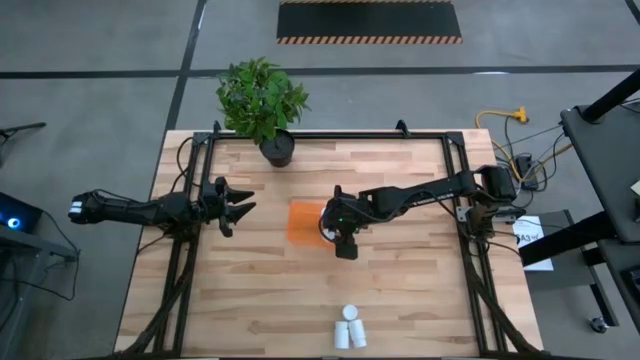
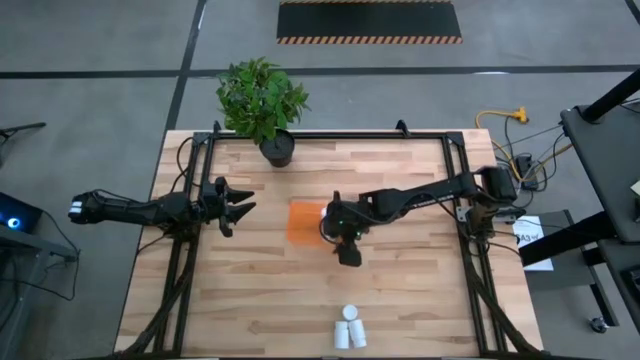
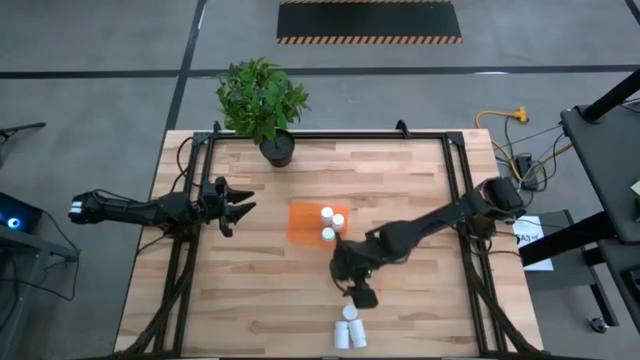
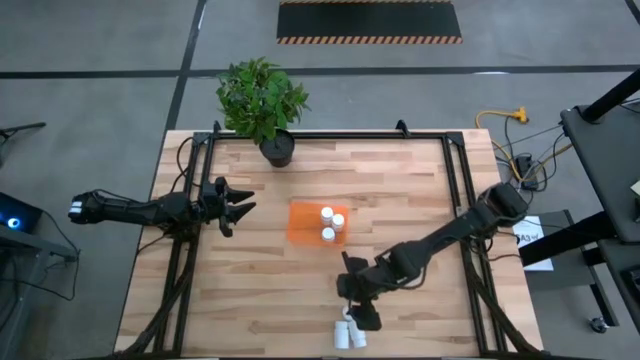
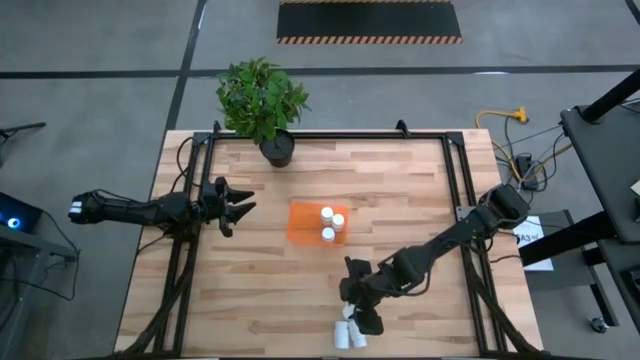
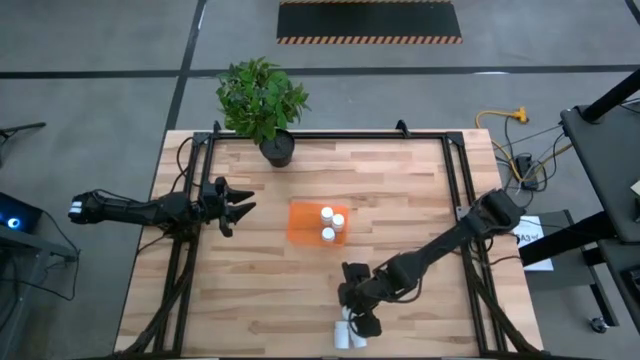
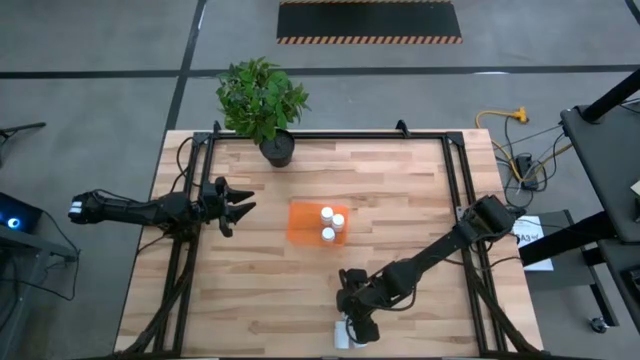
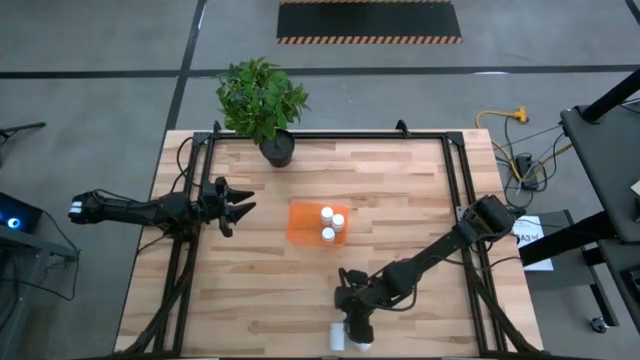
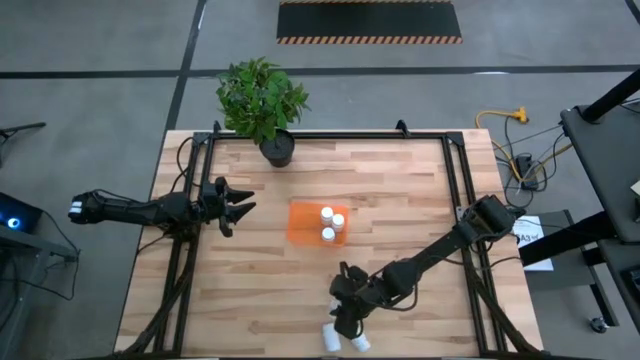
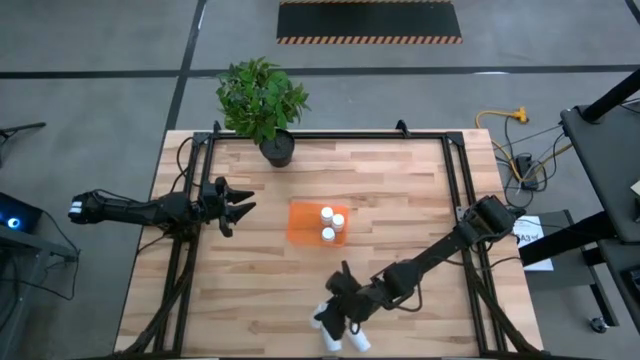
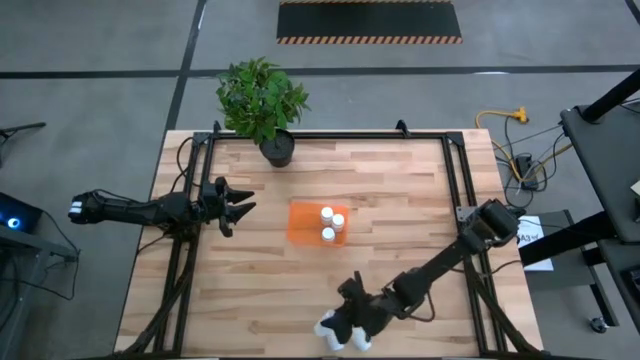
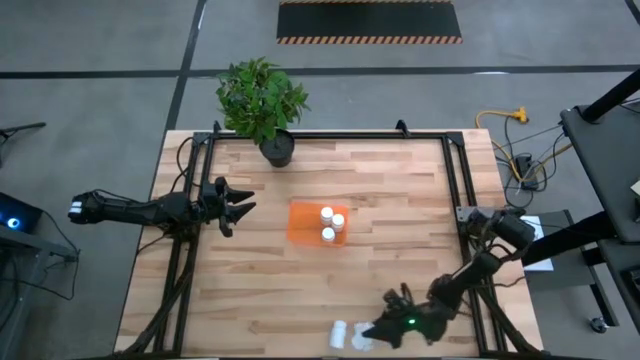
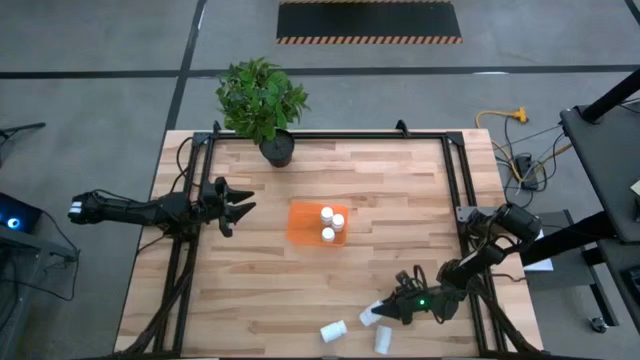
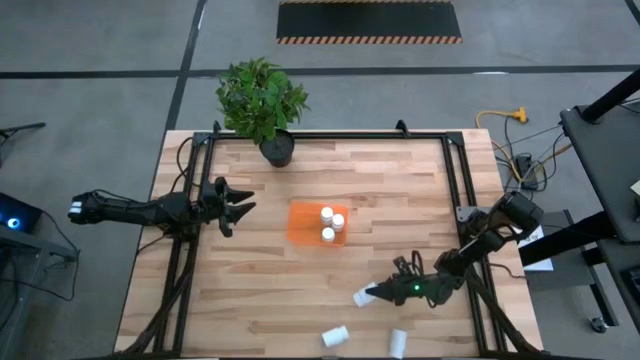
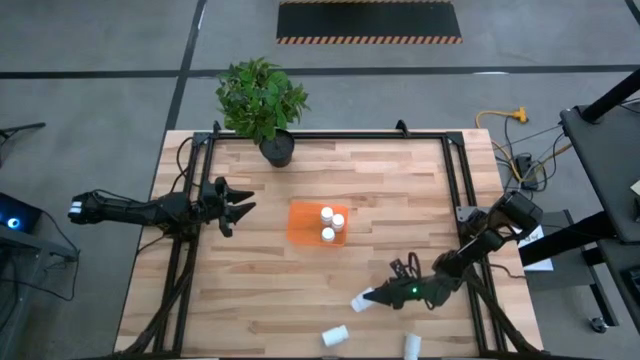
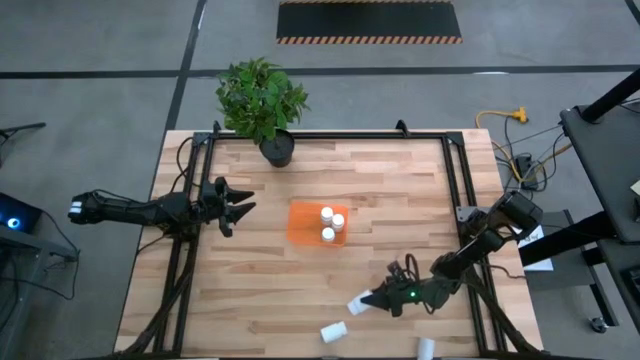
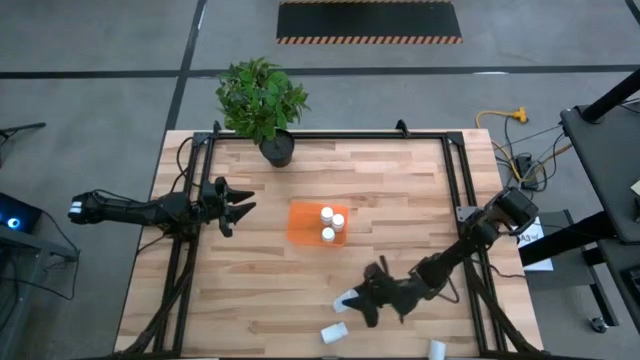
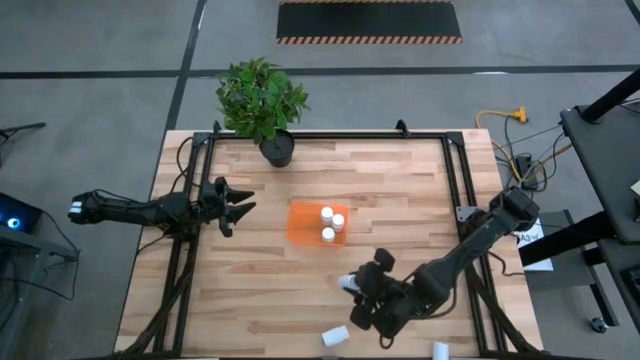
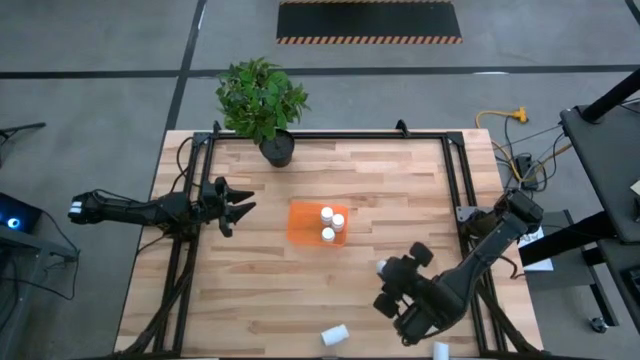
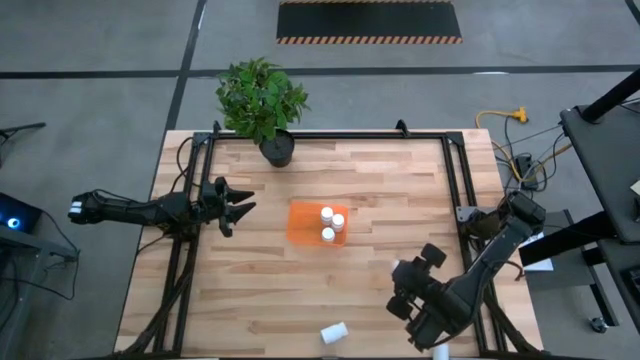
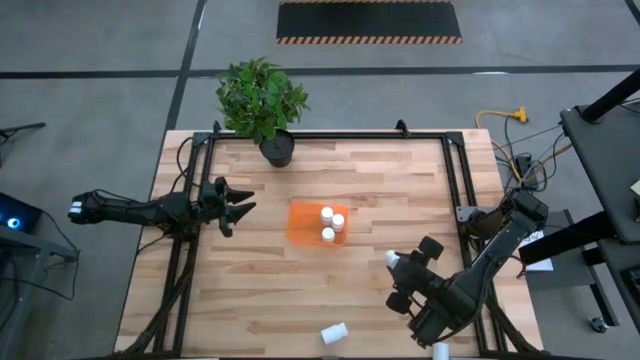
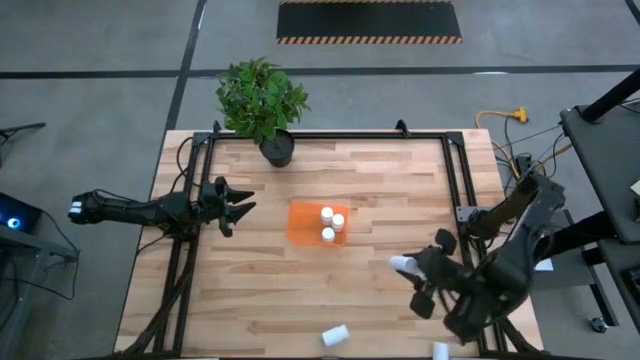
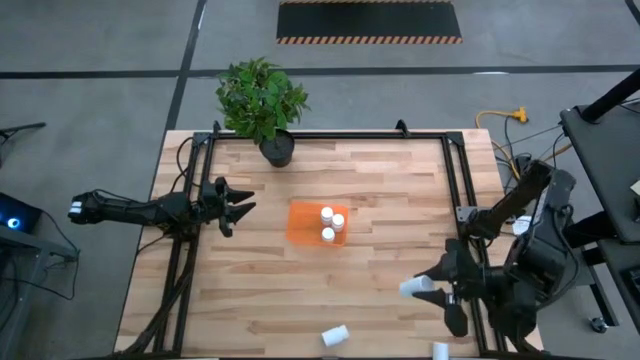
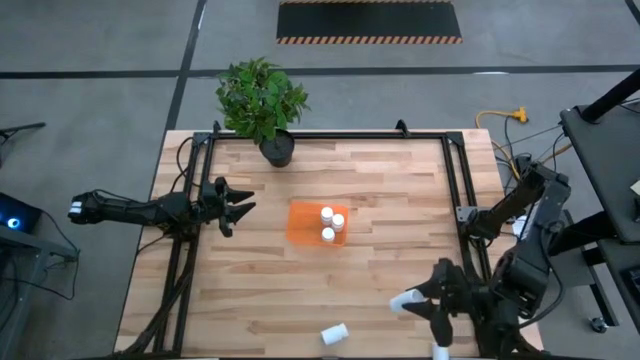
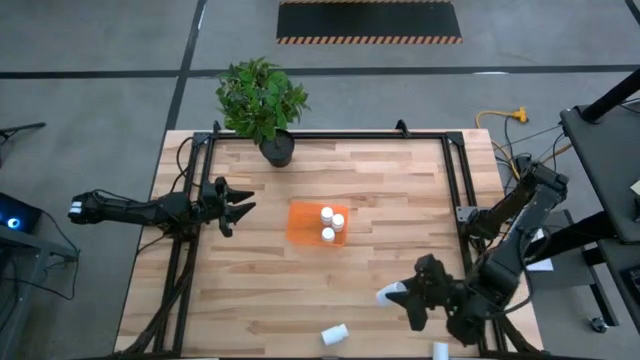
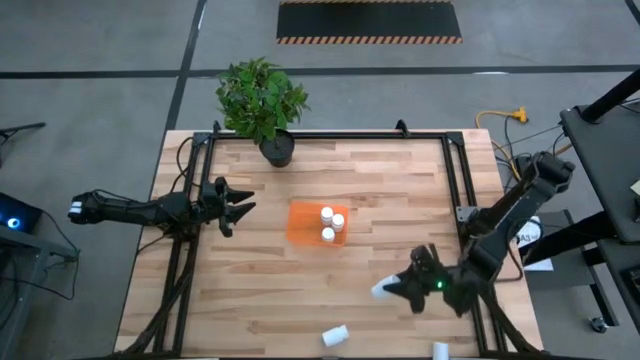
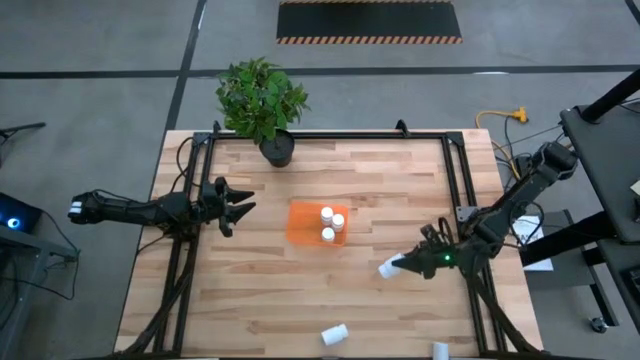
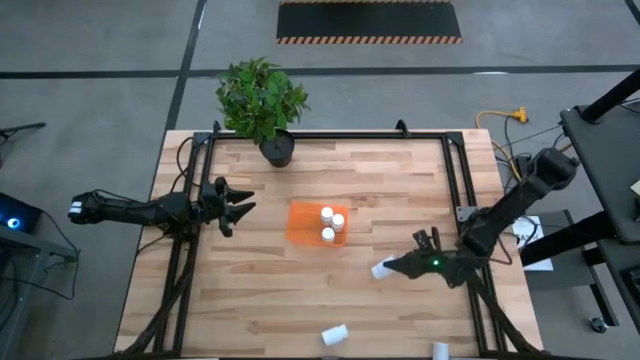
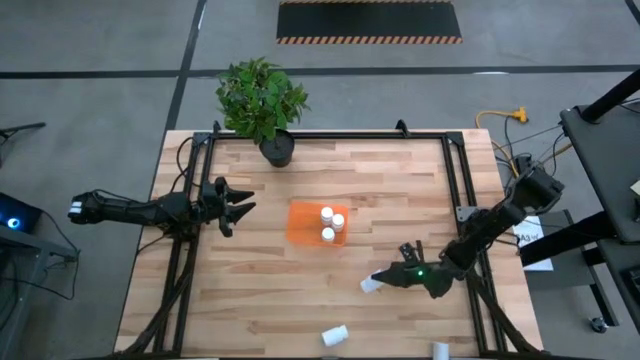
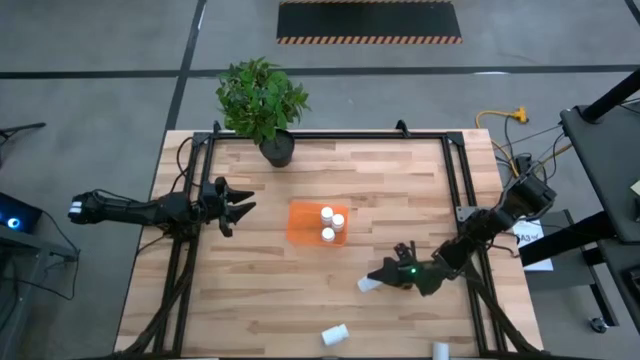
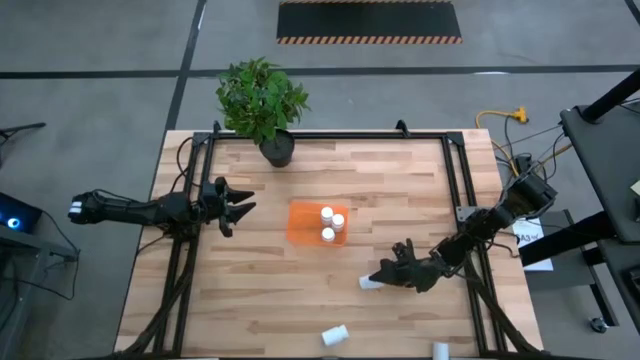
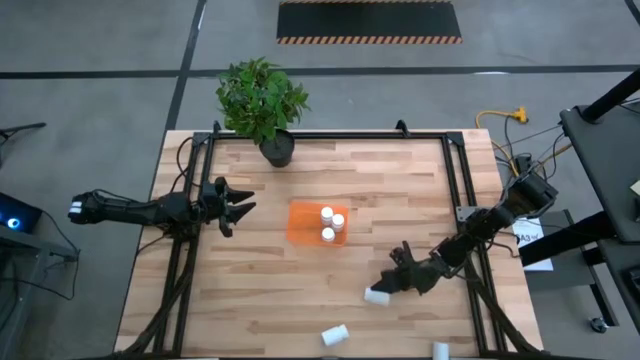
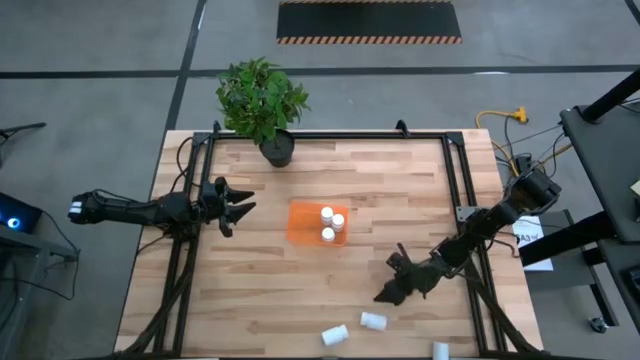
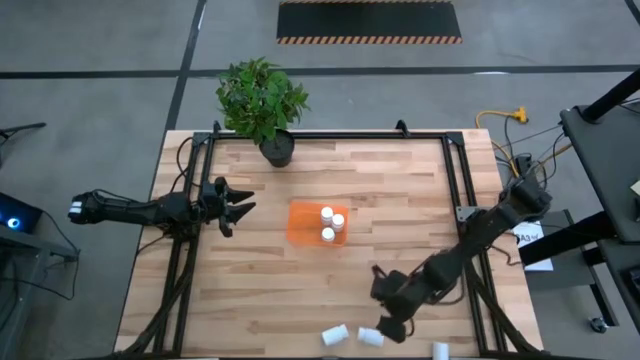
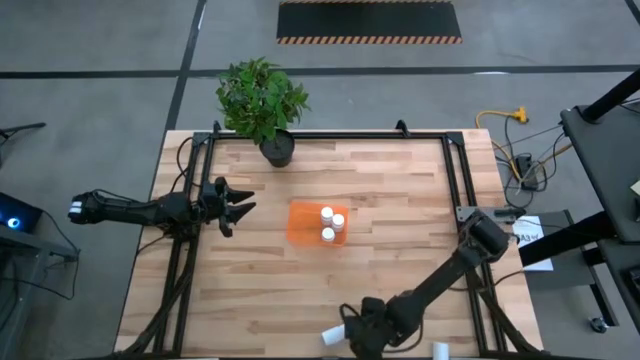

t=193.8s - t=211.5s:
Task: Pick and place pill bottles into a basket
Adjust the white pill bottles on the table

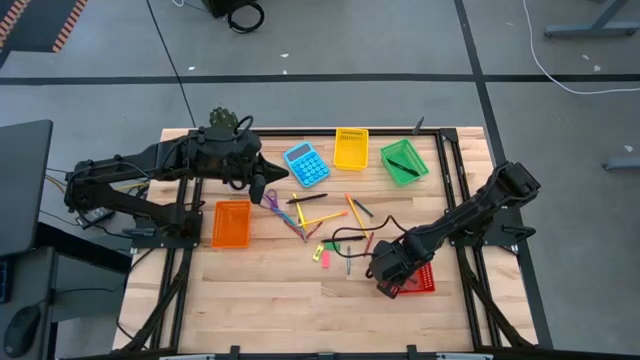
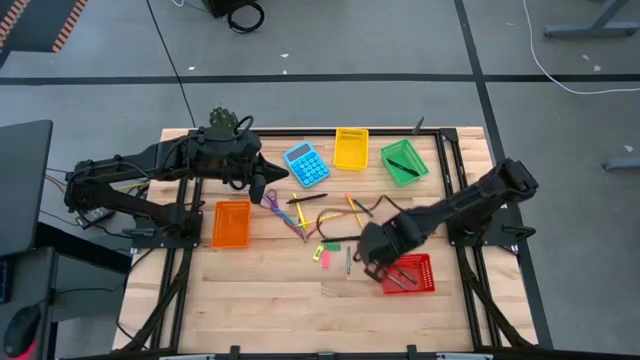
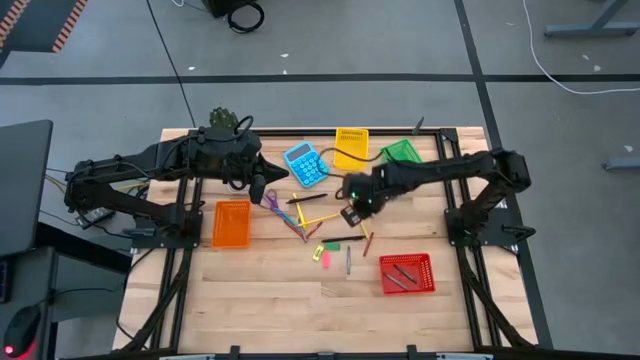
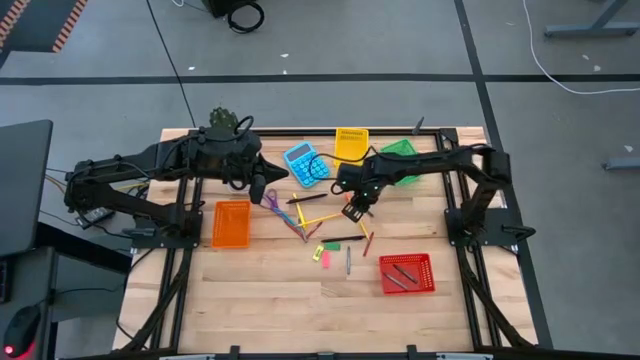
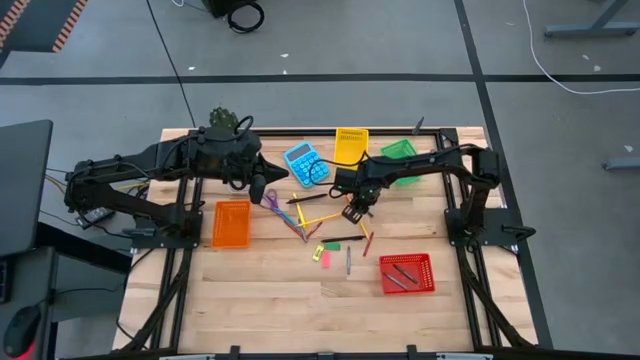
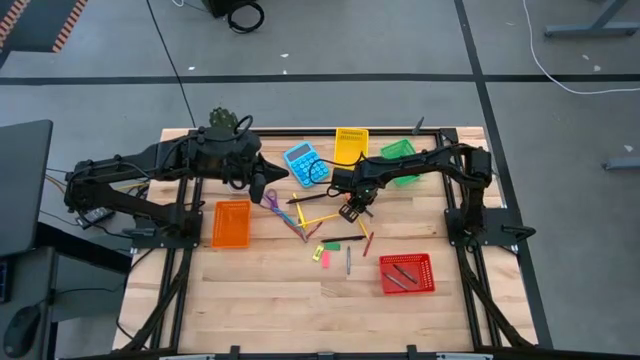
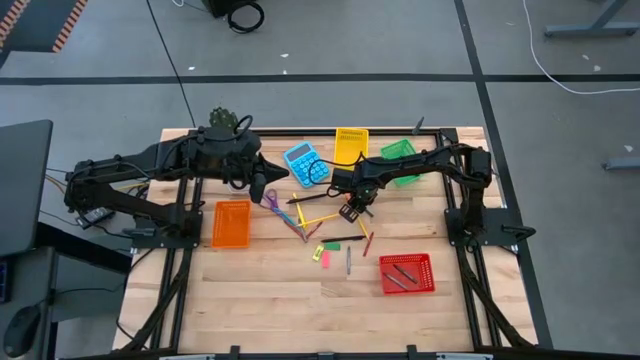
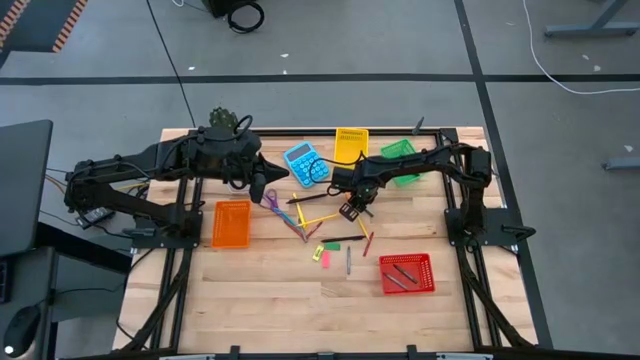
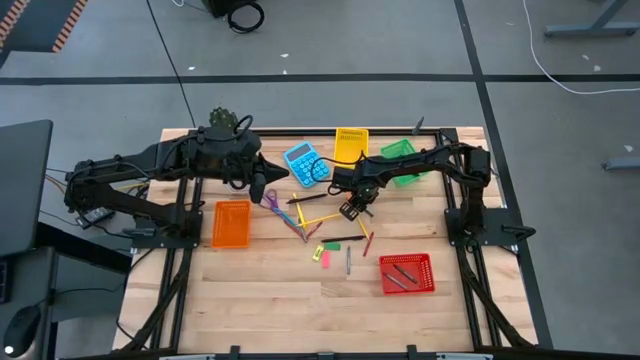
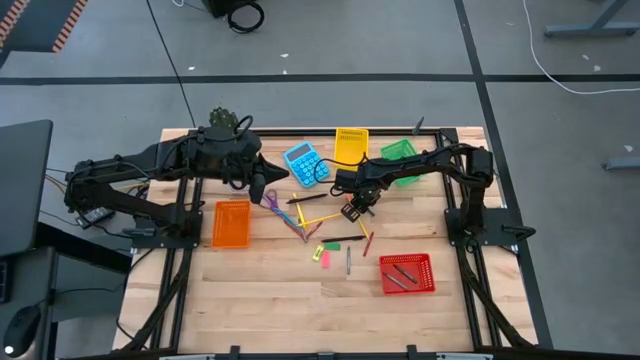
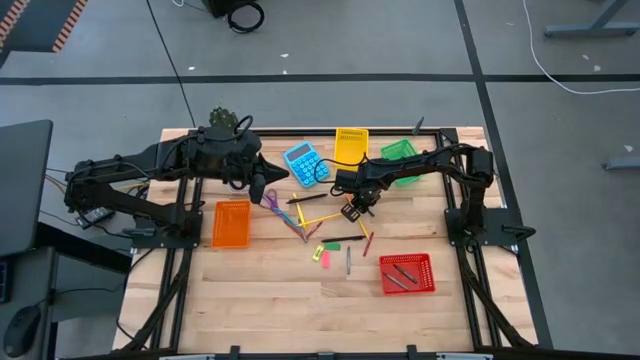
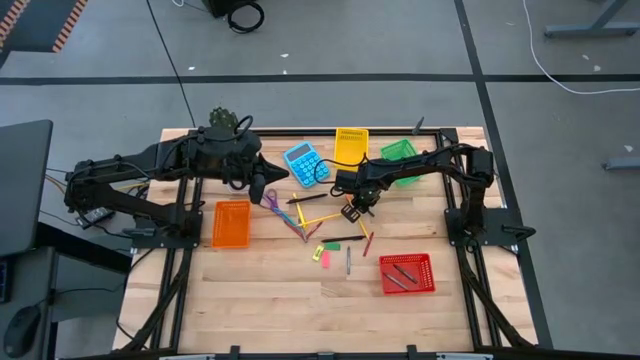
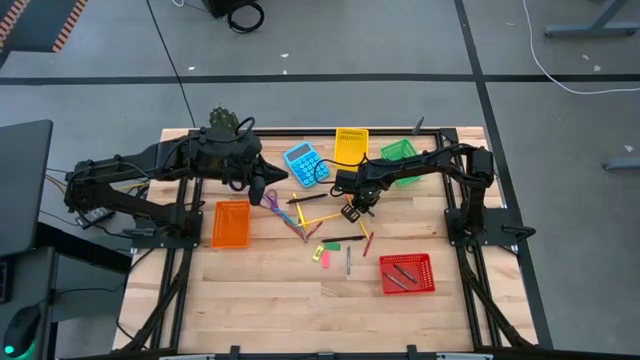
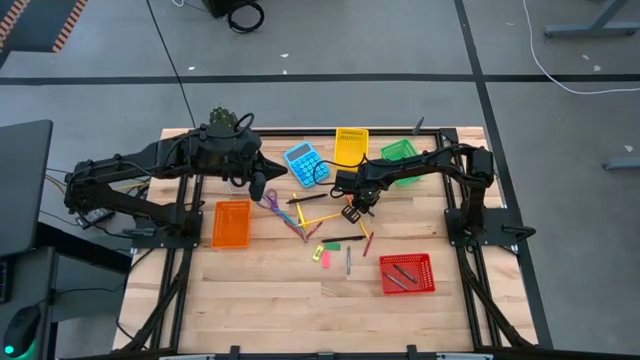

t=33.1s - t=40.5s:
Task: Sort crayons/erasers/pens/pencils in bins
Put the green crayon into the red bin
